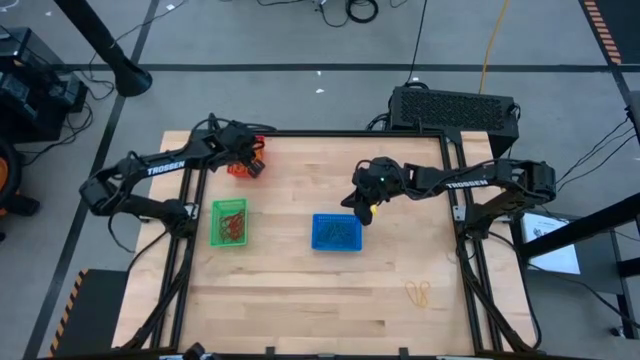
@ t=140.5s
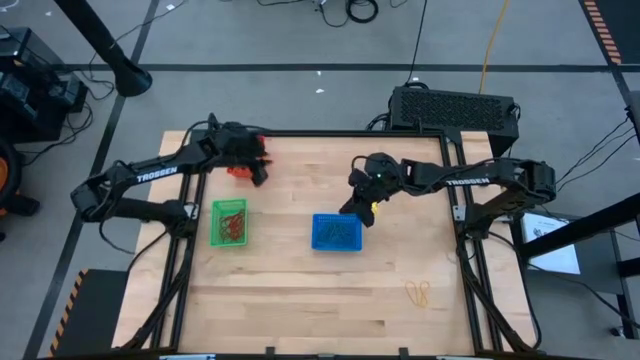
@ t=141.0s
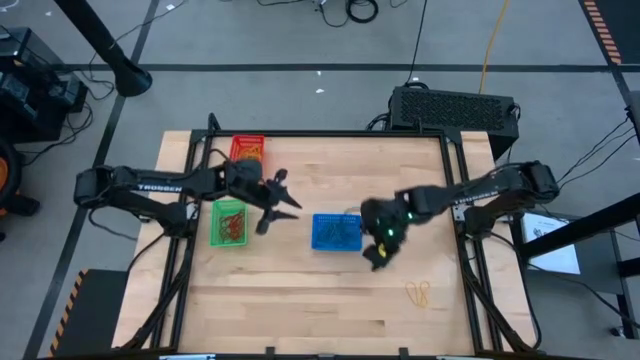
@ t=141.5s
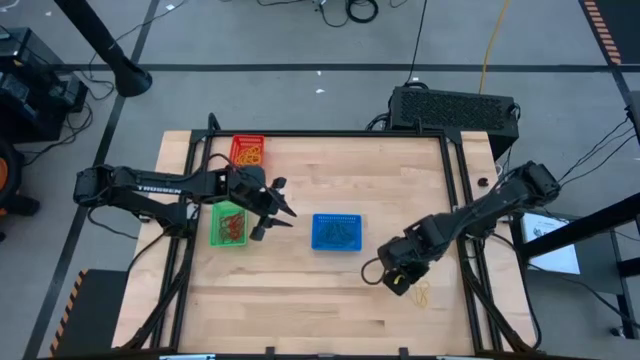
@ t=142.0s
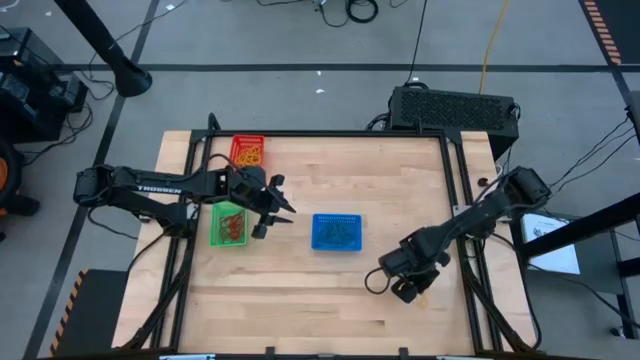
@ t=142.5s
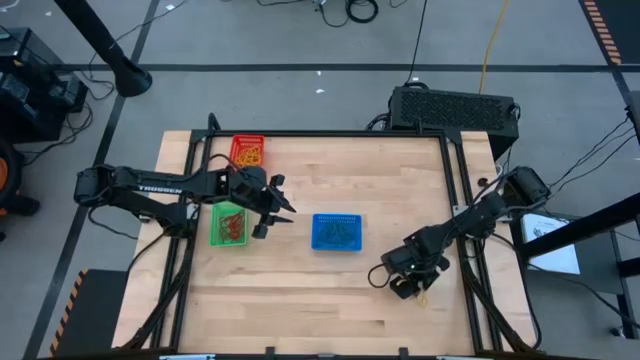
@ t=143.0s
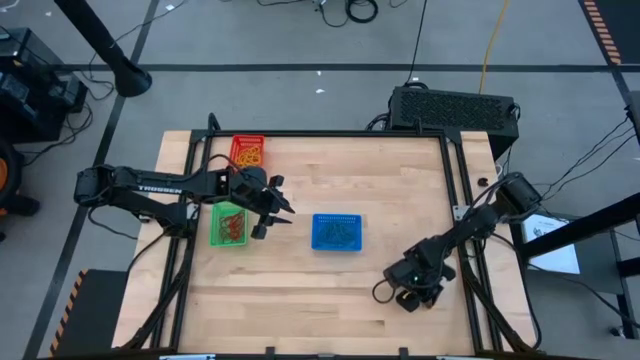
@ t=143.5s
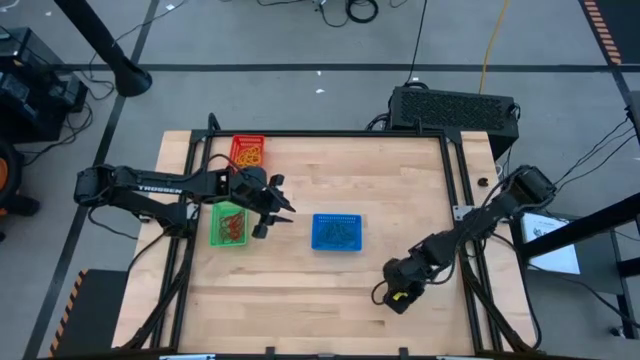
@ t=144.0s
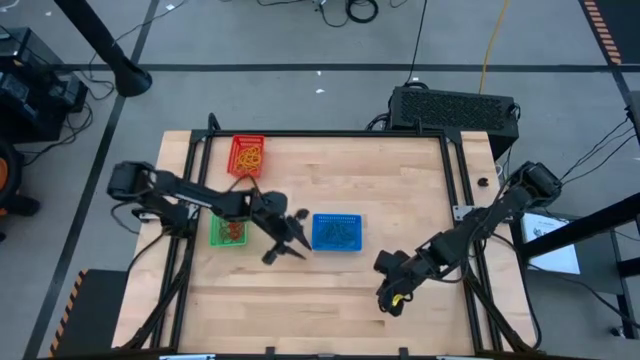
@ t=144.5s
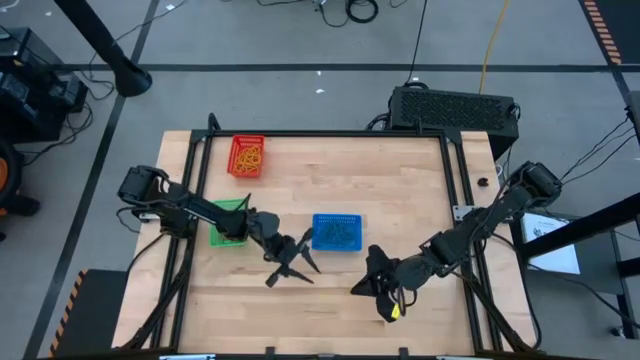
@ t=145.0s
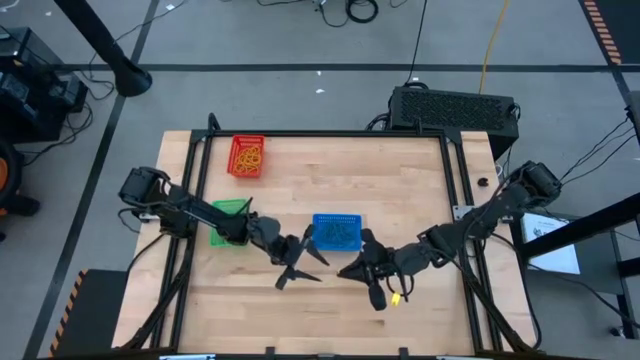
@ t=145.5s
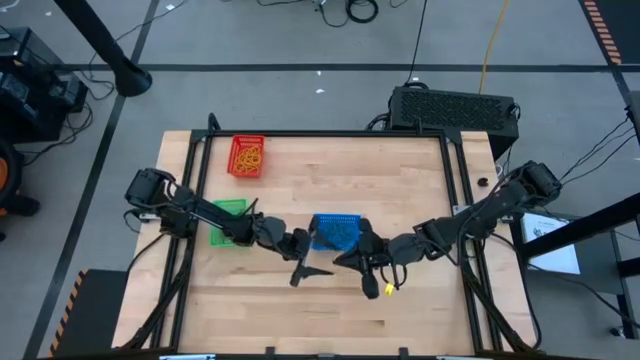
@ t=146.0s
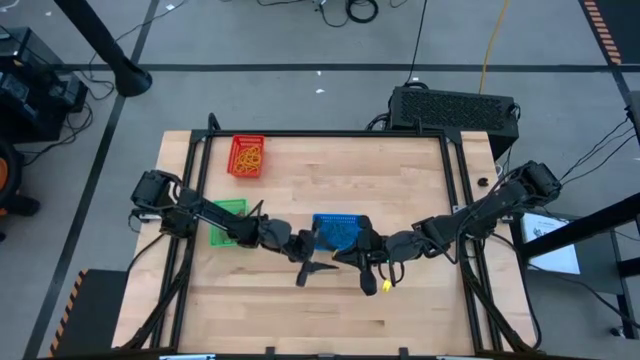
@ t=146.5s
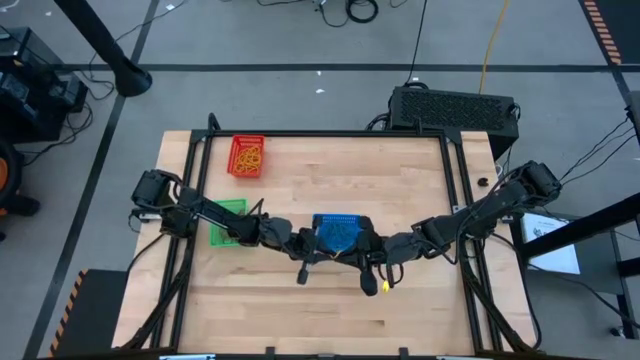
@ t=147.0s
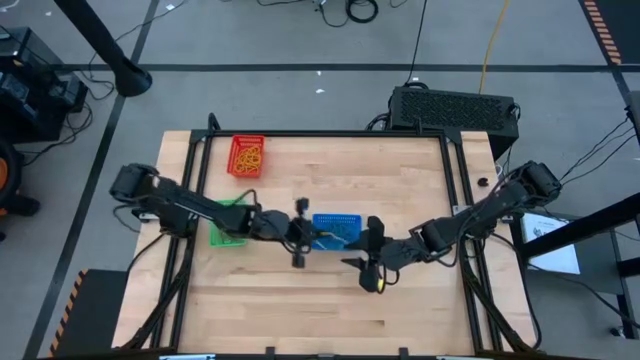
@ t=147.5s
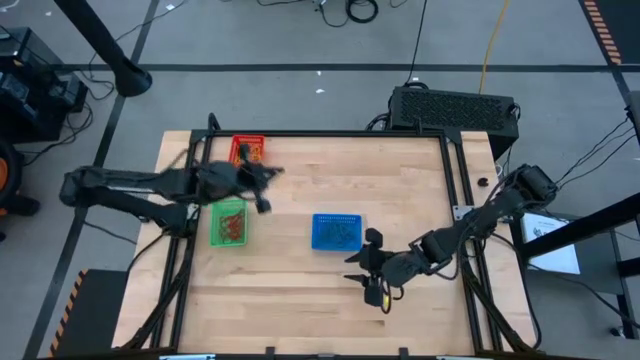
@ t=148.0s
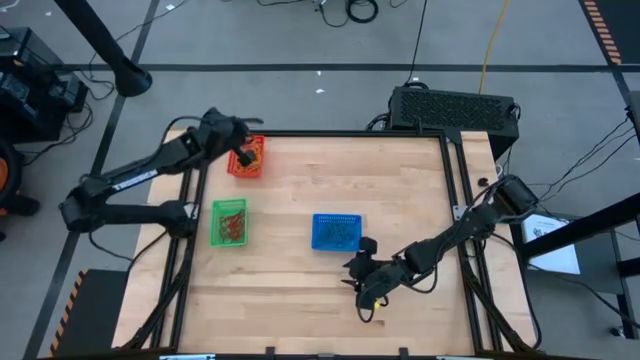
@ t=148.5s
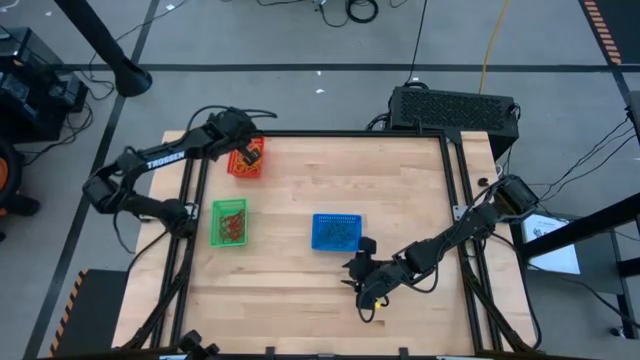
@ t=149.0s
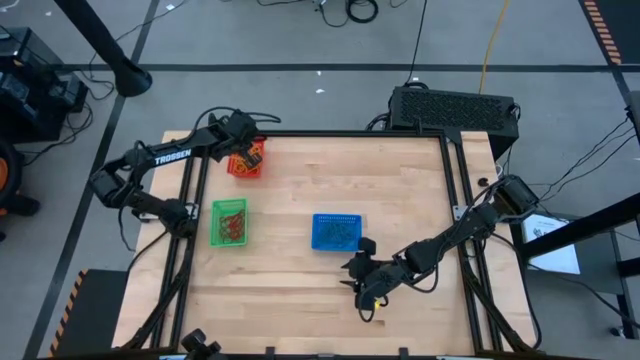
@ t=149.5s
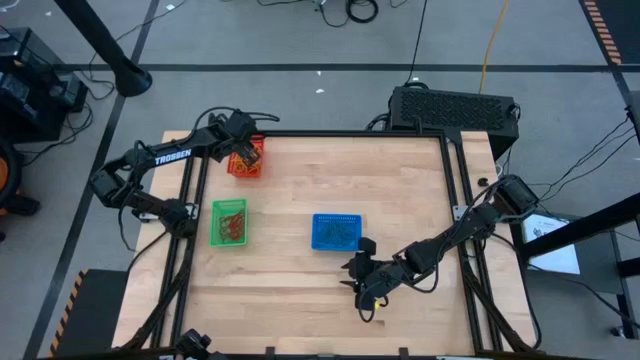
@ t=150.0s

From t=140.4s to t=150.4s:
Task: Sort rubber bands into baskets
Put the yellow rubber band into the red bin

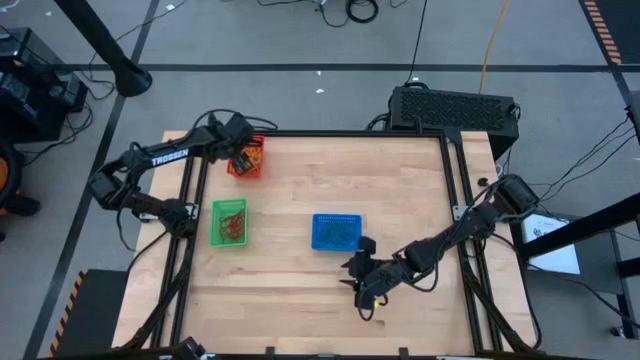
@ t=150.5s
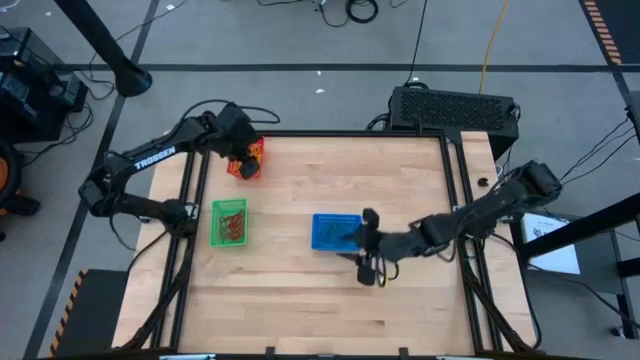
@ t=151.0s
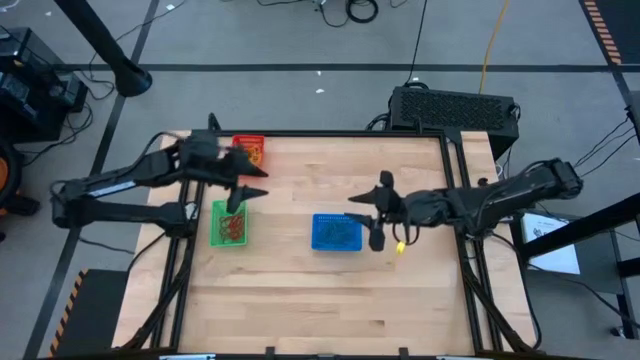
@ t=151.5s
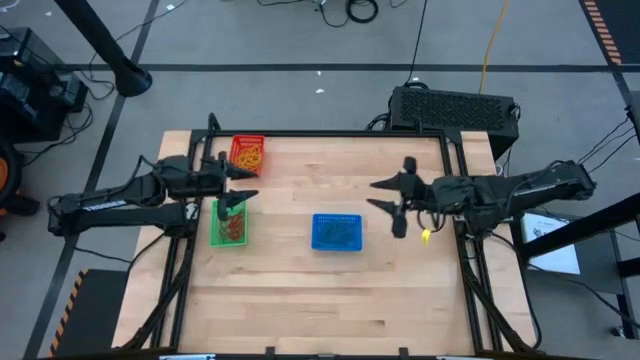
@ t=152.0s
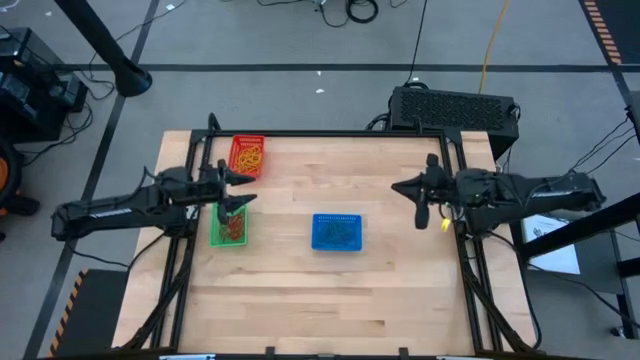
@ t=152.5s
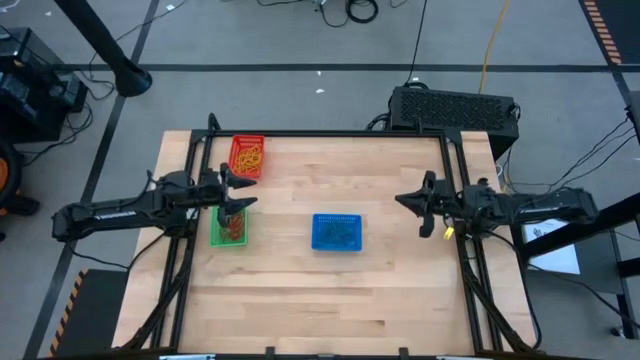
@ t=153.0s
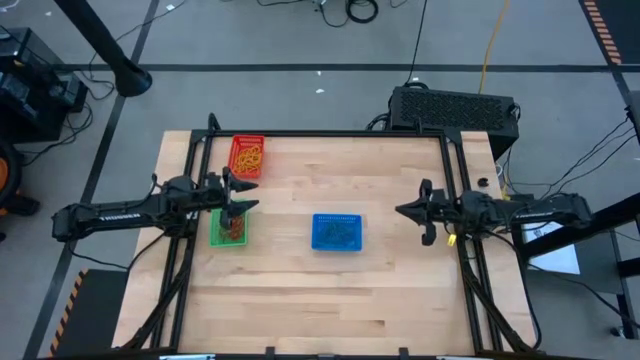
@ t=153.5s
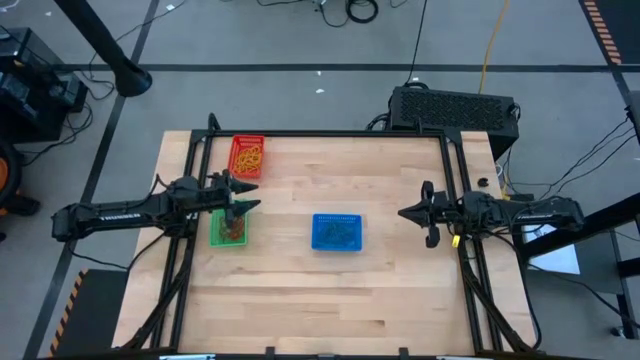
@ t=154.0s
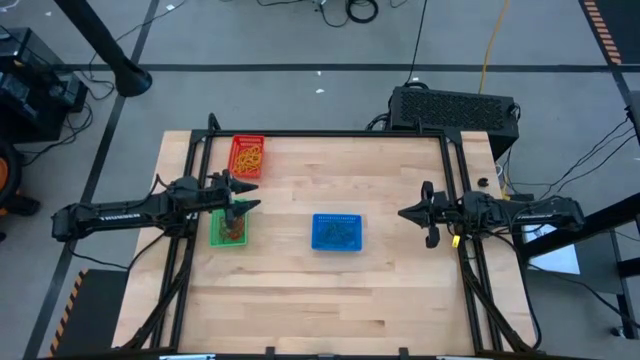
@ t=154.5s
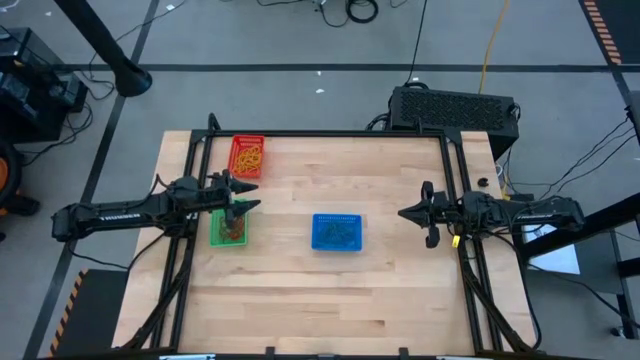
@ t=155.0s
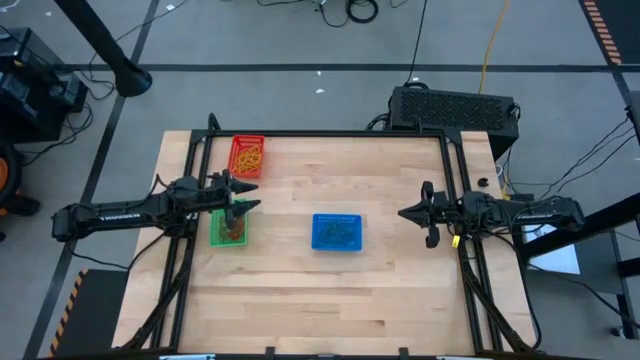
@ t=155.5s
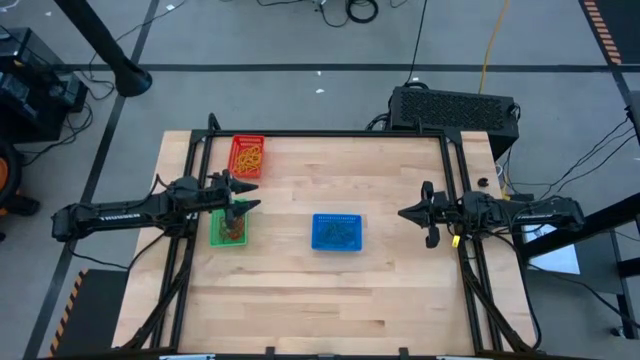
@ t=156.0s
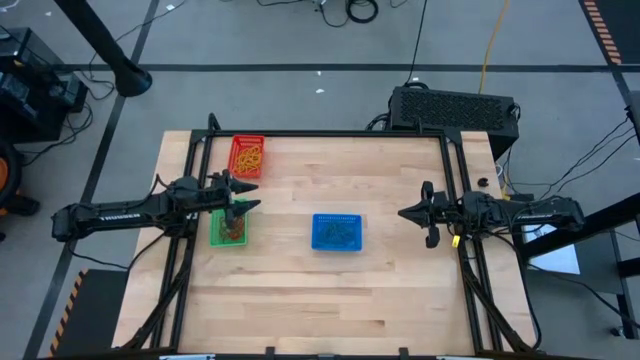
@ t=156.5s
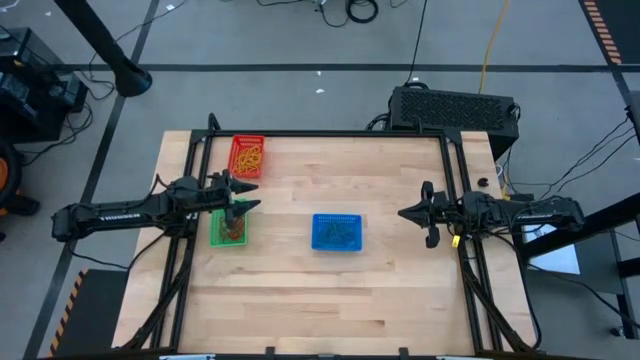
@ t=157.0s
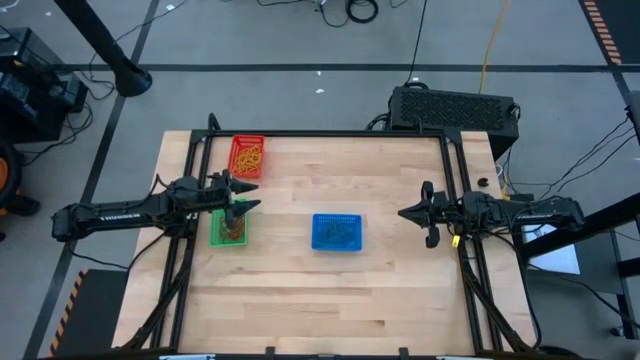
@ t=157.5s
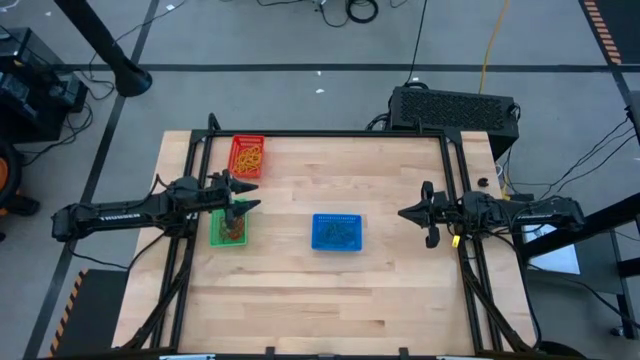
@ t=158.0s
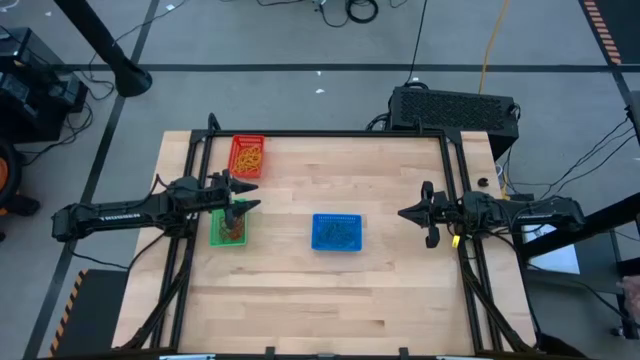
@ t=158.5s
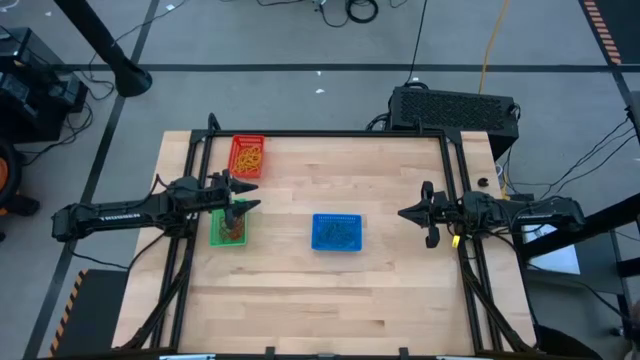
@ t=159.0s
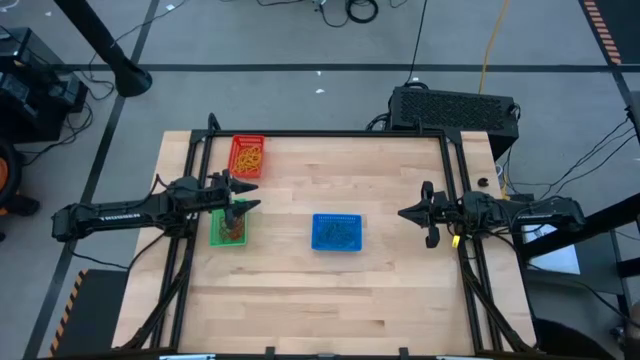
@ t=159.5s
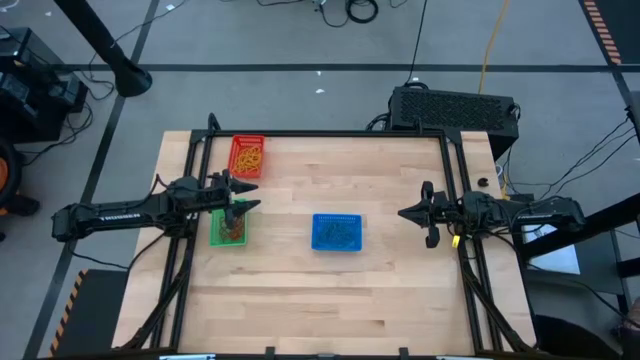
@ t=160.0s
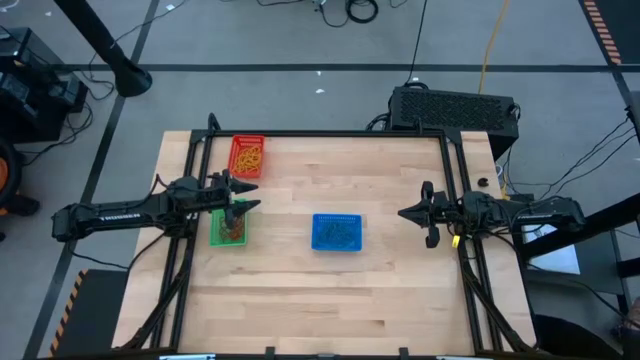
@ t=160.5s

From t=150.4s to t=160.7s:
Return to Home Position
